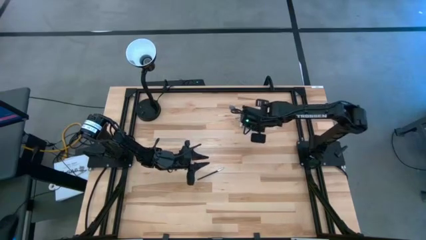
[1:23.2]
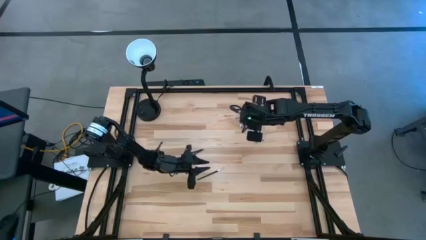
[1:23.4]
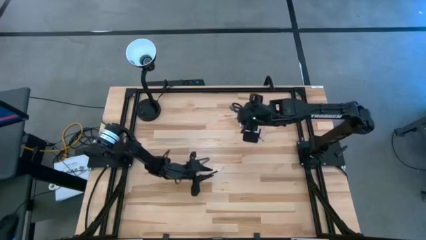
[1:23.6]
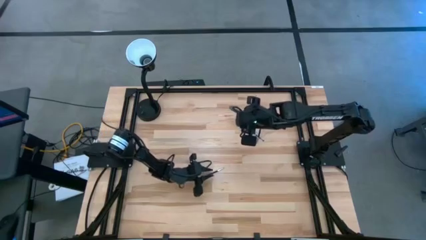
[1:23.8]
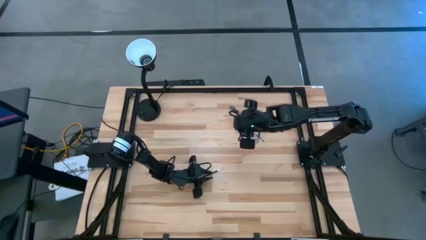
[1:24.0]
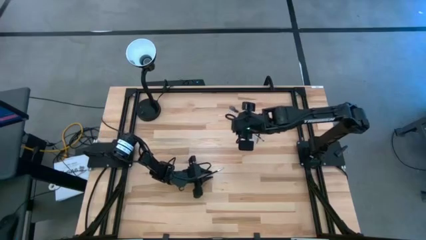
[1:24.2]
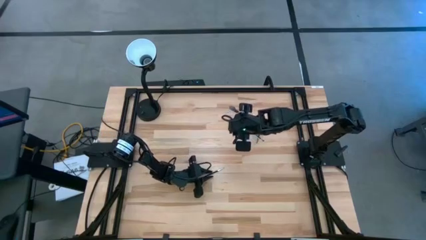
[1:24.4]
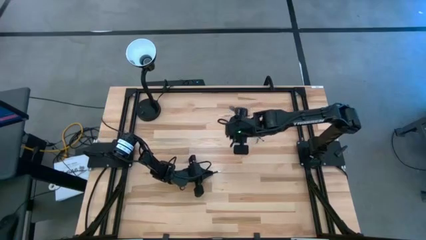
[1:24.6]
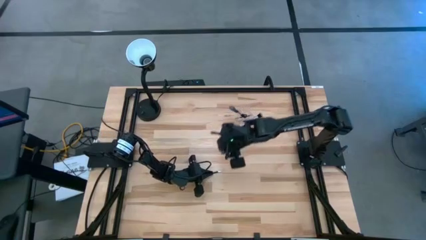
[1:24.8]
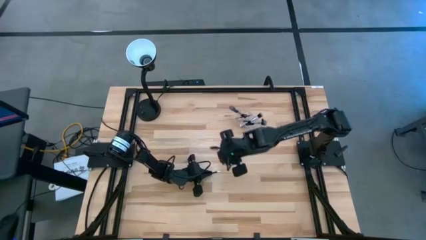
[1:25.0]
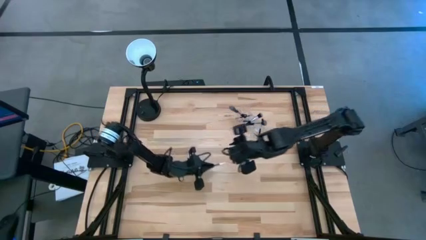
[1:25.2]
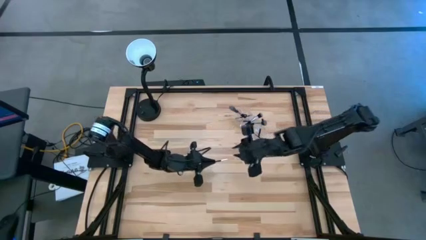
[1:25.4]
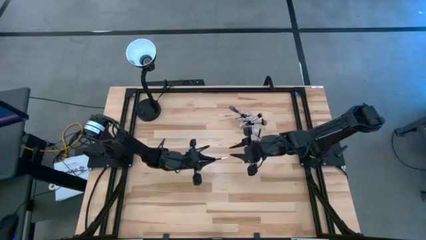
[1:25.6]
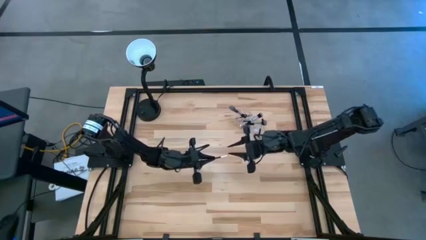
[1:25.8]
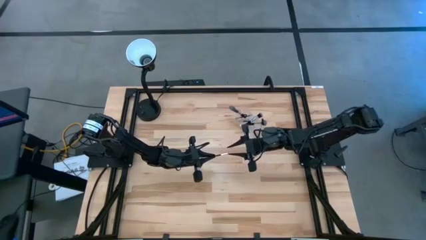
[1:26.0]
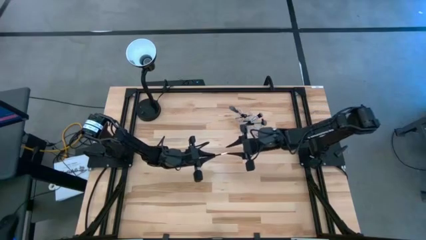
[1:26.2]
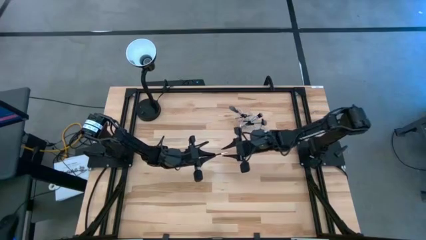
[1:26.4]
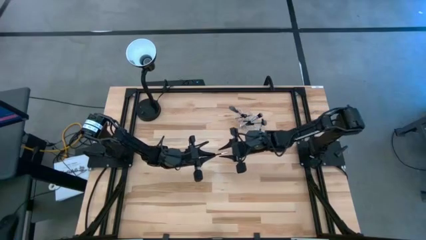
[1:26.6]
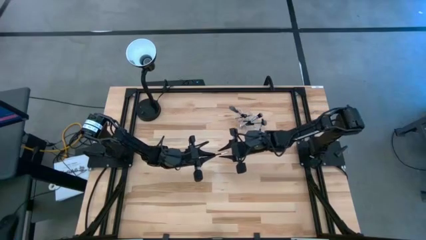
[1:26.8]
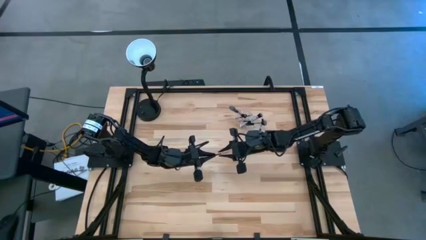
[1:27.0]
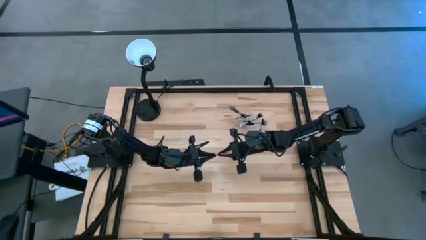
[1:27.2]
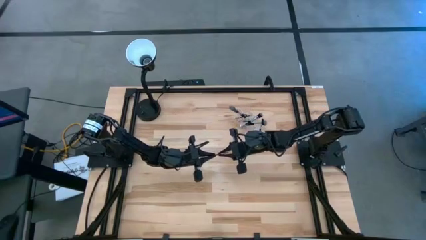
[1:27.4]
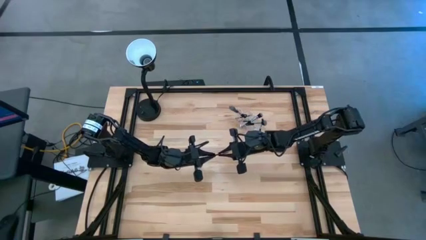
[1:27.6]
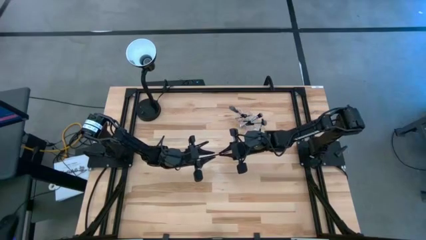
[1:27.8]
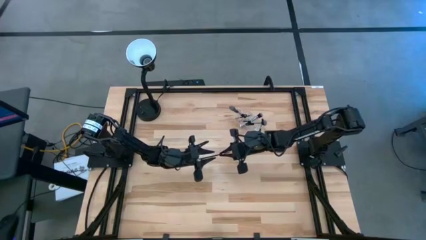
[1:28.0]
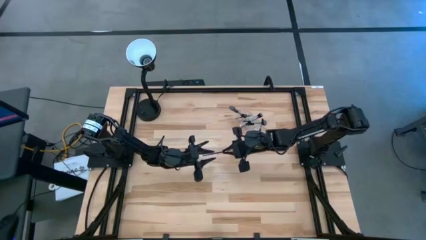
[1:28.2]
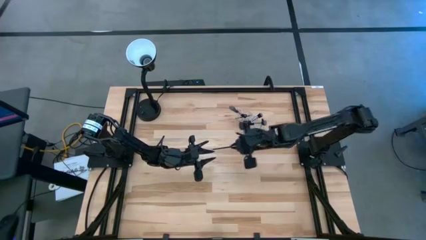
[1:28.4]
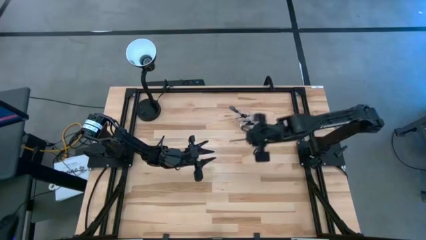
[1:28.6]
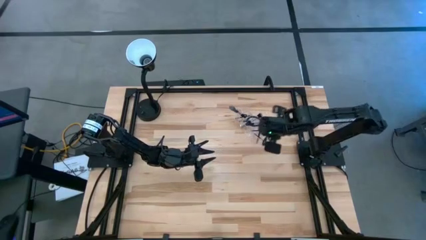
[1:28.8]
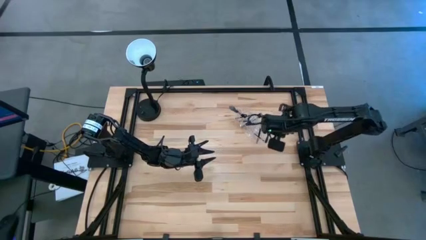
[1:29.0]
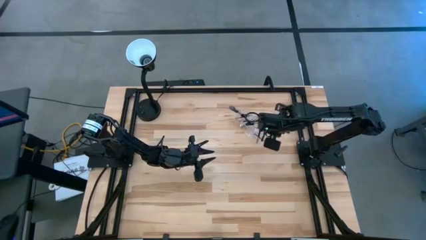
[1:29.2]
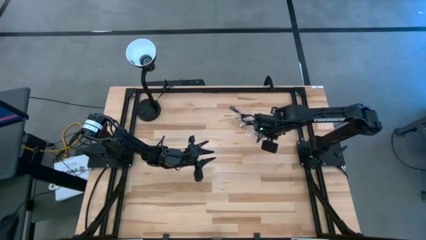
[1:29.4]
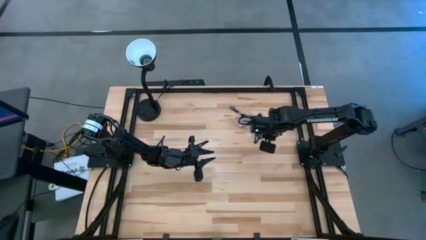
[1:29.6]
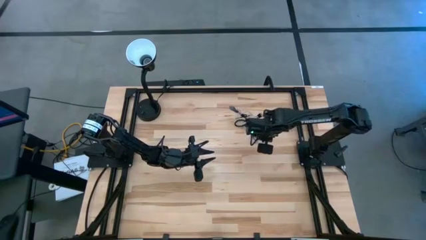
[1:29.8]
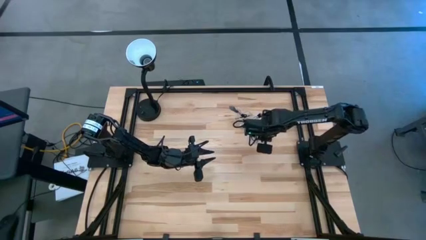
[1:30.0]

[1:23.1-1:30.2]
Task: Sort items
Put the liner brush into the right side of the transparent organizer

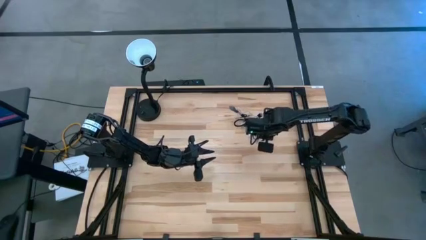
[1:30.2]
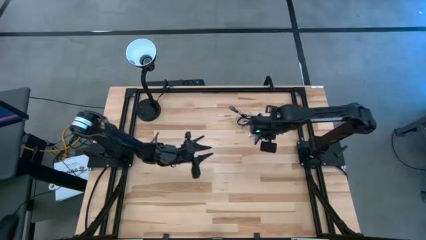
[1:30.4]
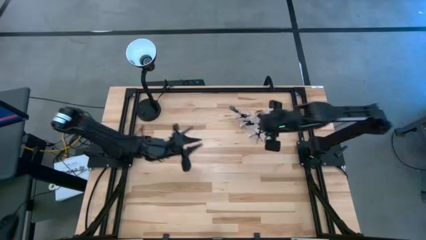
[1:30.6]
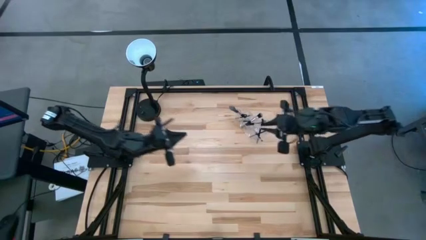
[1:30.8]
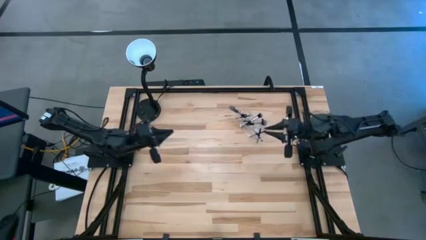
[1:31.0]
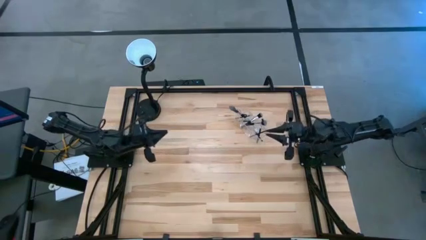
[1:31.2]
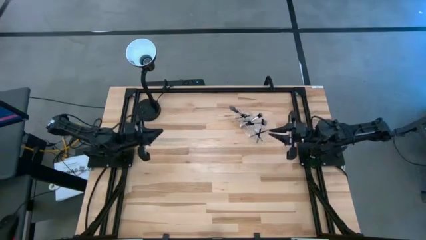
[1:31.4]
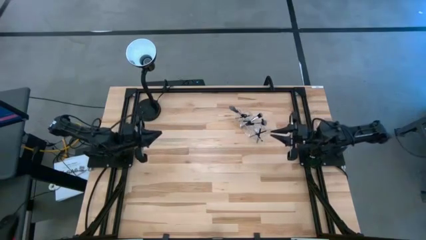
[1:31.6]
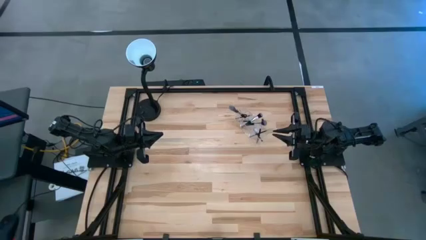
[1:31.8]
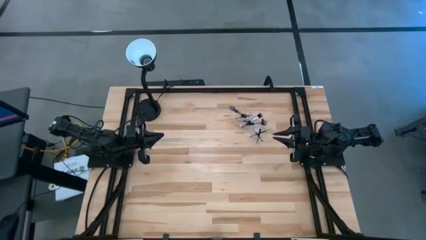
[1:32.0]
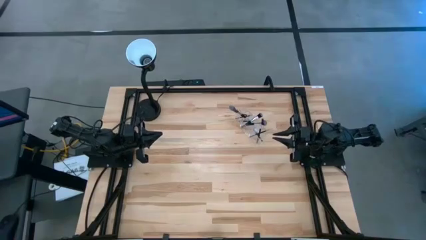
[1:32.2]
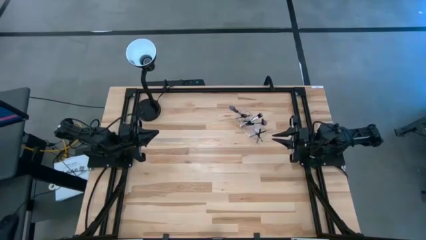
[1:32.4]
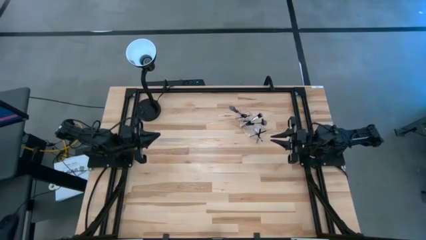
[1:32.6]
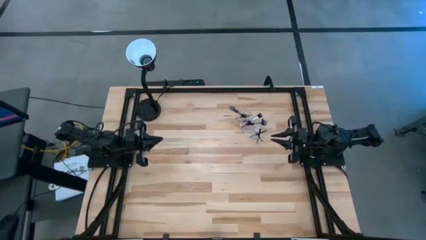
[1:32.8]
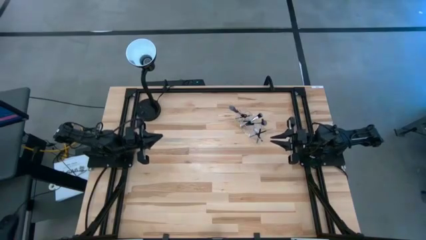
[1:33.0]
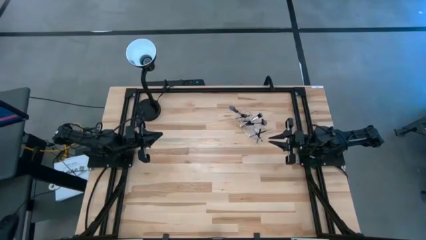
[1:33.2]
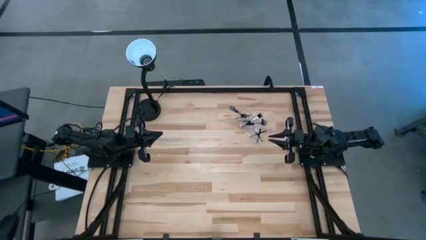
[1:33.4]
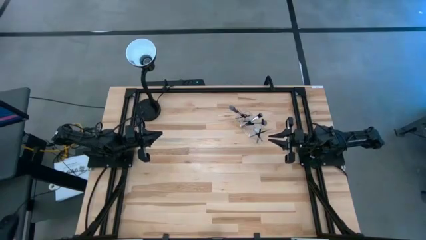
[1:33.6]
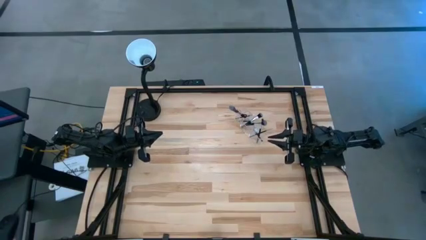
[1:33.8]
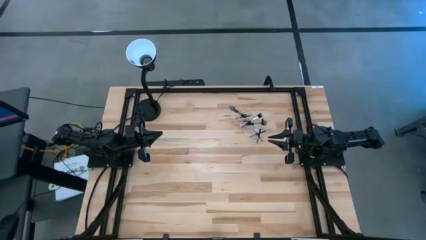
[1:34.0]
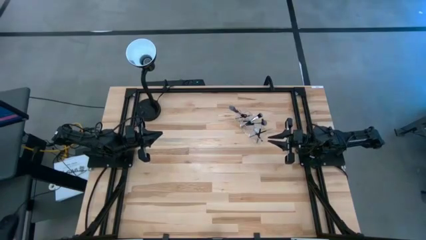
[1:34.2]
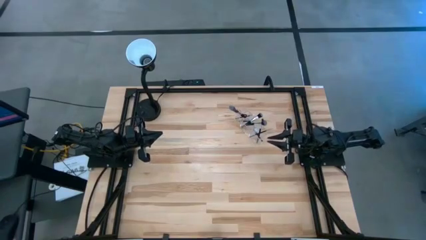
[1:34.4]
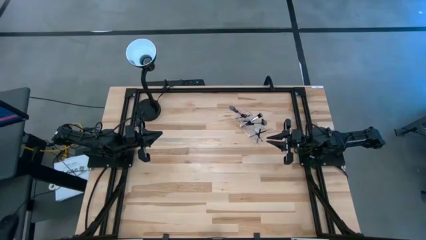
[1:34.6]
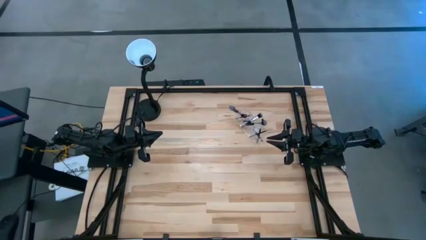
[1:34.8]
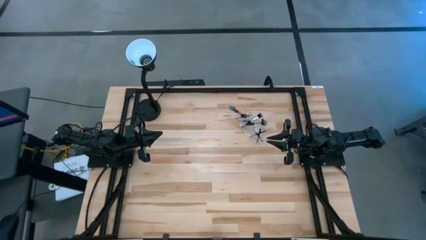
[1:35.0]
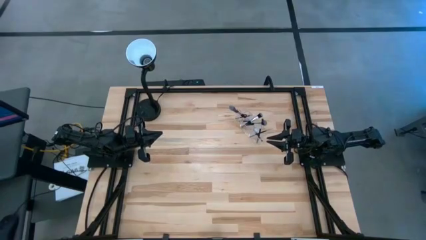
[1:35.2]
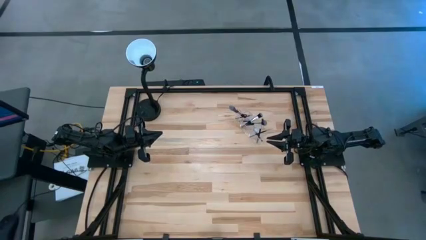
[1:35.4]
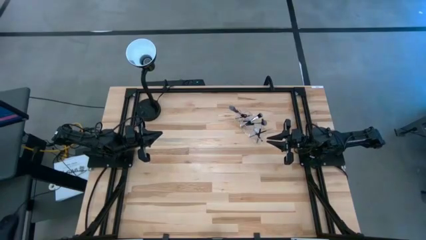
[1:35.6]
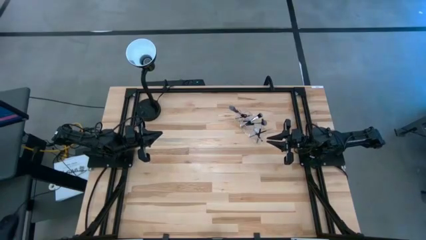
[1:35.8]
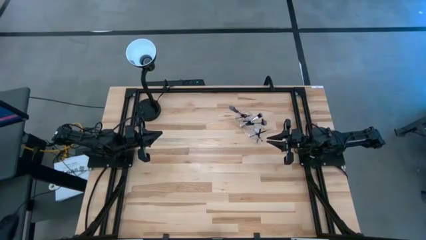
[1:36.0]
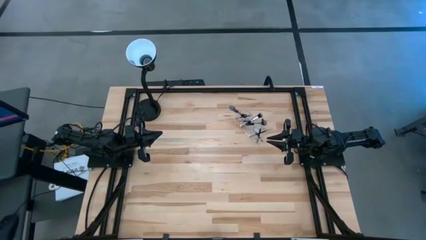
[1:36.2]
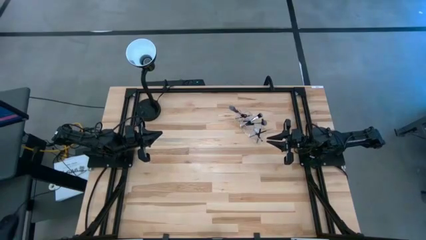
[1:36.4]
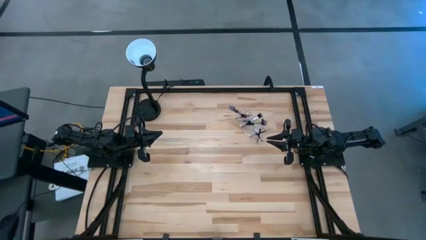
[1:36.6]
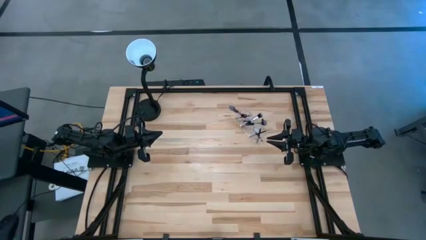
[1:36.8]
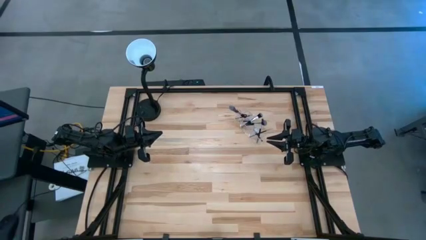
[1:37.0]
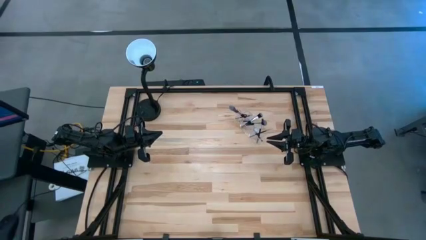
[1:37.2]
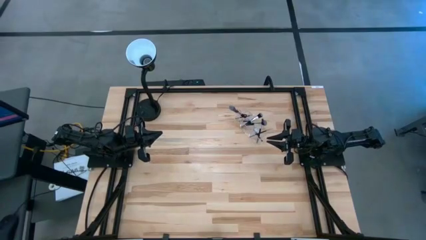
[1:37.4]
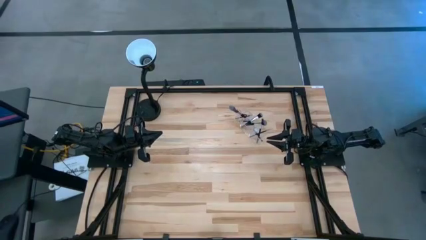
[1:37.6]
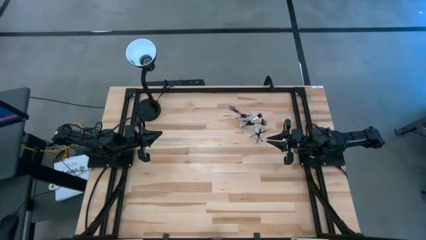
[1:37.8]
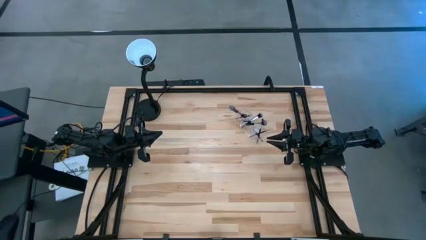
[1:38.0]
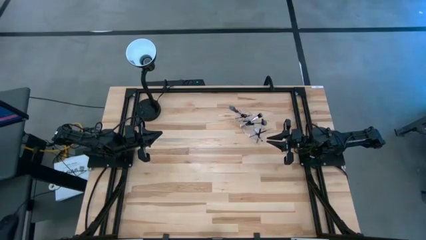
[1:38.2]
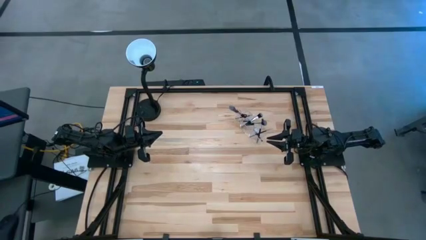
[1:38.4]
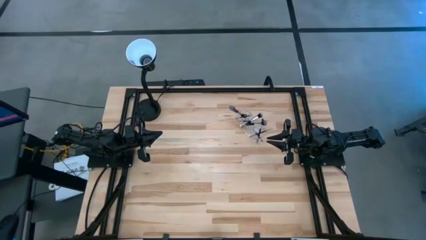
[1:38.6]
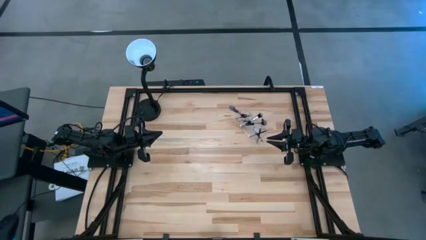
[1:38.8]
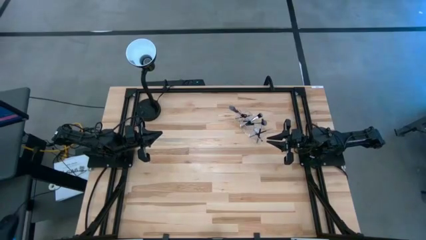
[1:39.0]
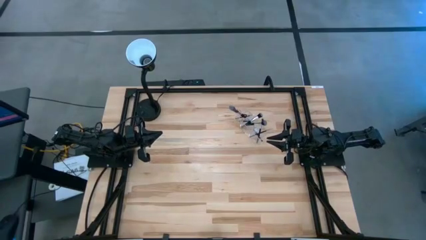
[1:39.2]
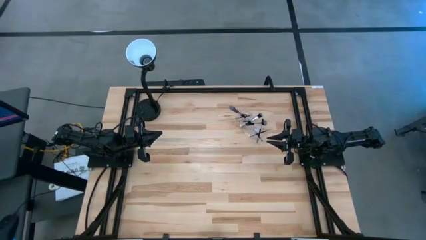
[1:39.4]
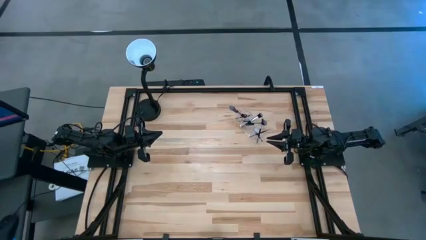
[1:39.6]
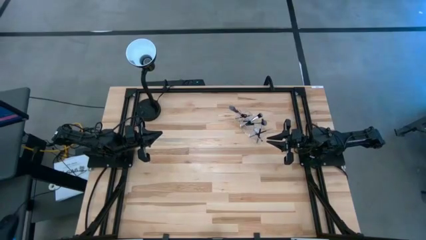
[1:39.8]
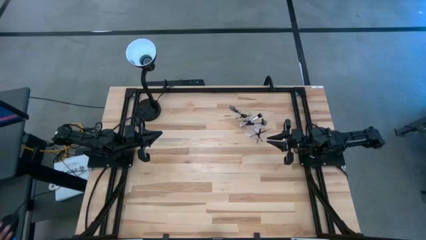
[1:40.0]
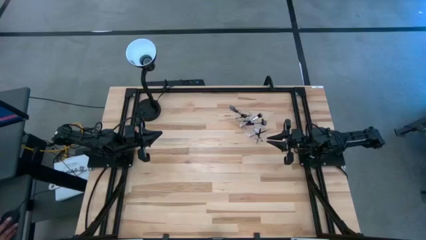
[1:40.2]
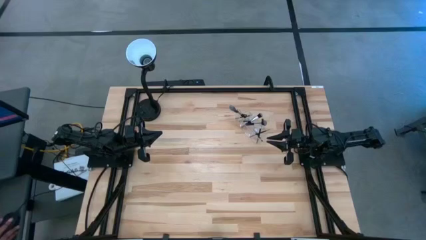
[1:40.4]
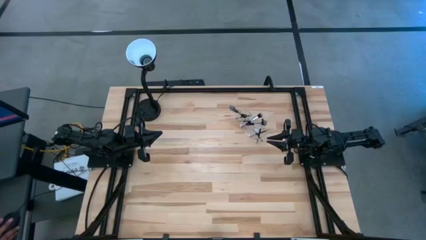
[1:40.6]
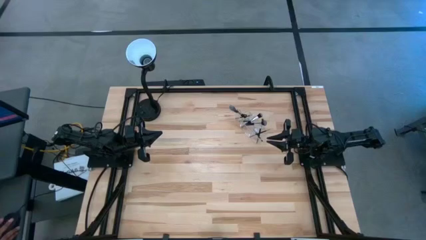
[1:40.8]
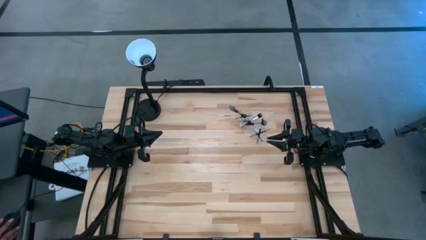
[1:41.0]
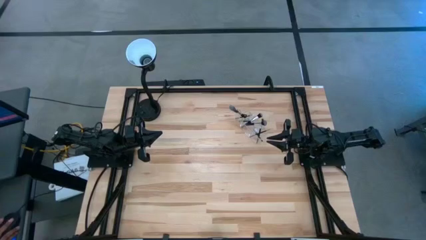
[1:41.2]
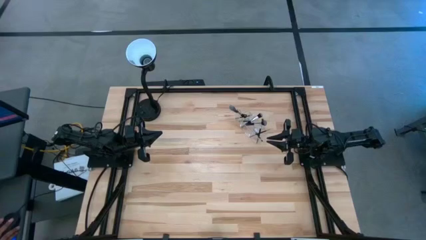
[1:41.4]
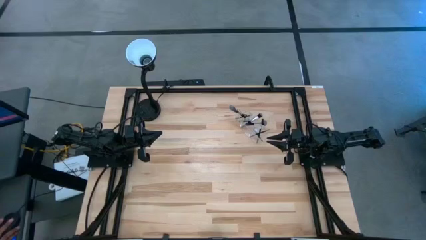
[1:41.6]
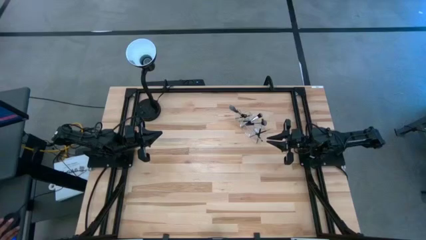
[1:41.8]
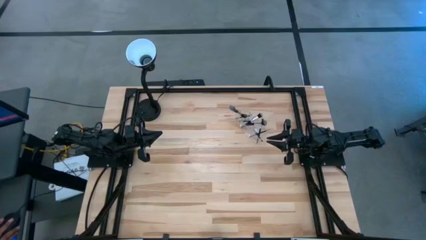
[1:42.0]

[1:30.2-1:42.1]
Return to Home Position
